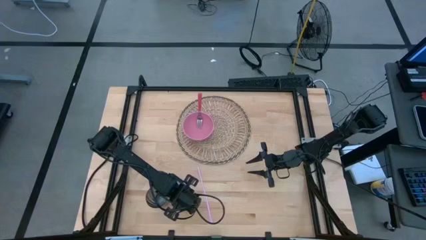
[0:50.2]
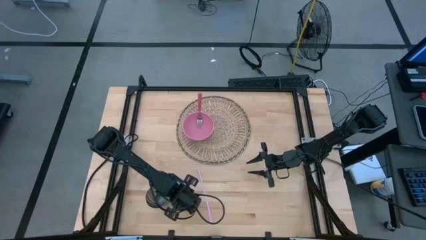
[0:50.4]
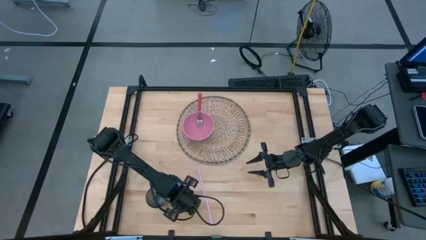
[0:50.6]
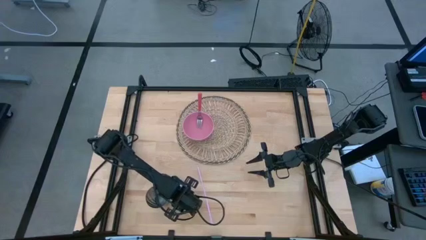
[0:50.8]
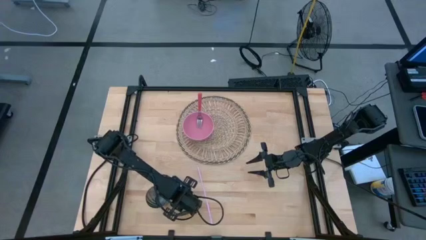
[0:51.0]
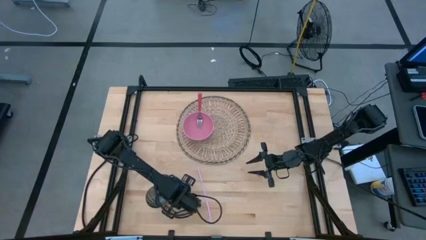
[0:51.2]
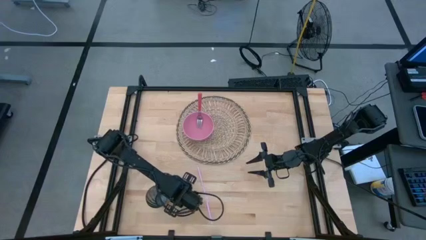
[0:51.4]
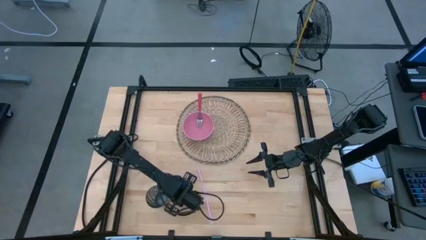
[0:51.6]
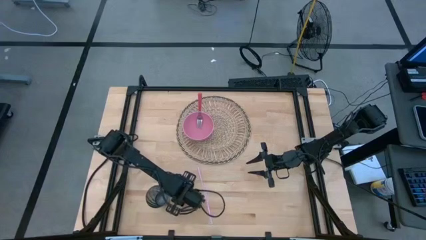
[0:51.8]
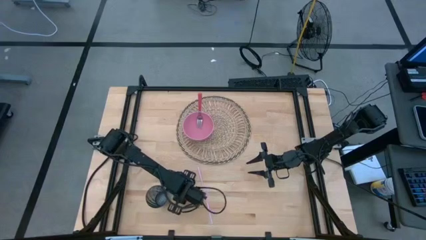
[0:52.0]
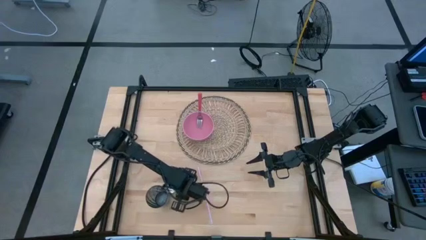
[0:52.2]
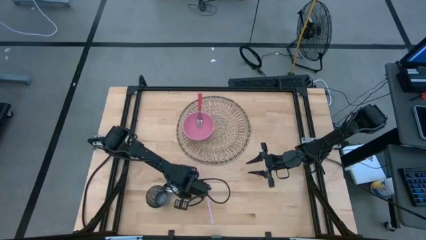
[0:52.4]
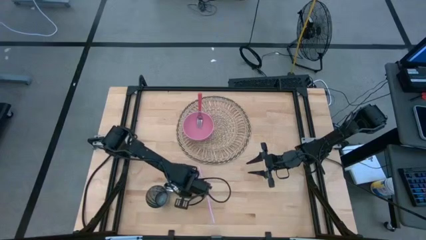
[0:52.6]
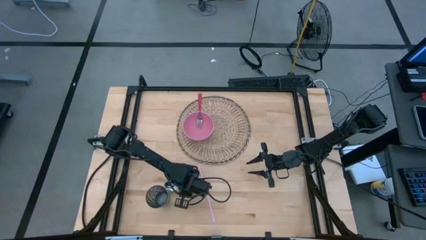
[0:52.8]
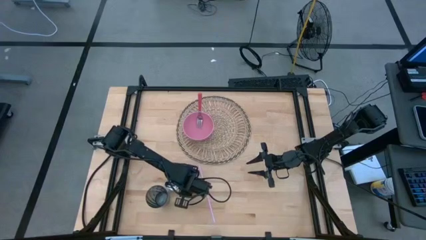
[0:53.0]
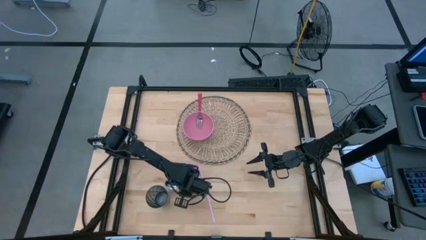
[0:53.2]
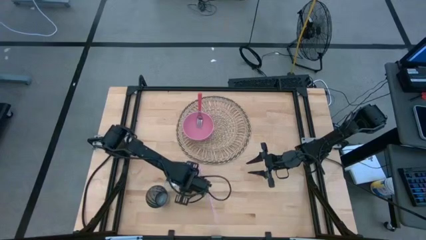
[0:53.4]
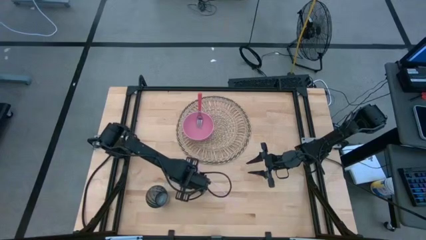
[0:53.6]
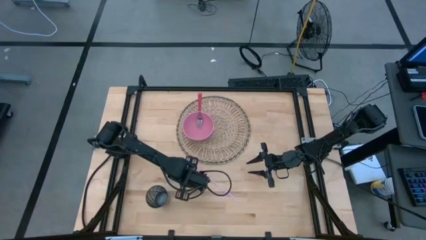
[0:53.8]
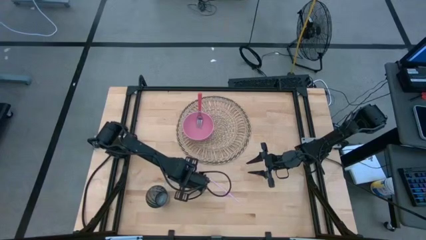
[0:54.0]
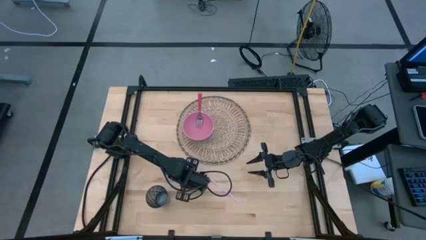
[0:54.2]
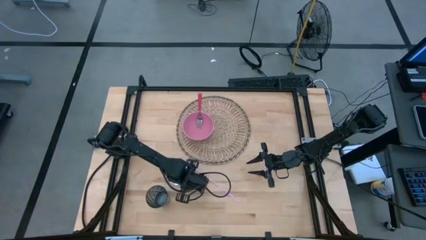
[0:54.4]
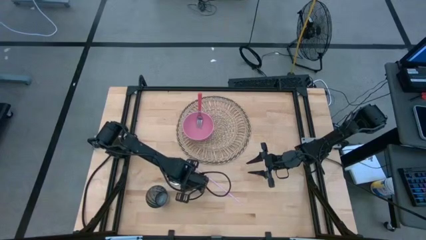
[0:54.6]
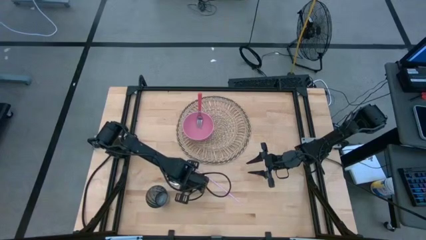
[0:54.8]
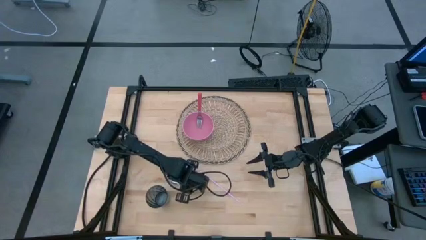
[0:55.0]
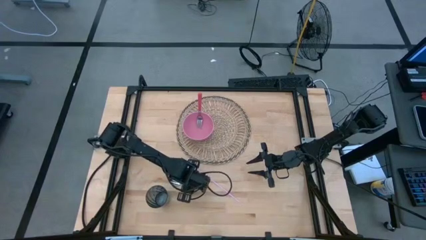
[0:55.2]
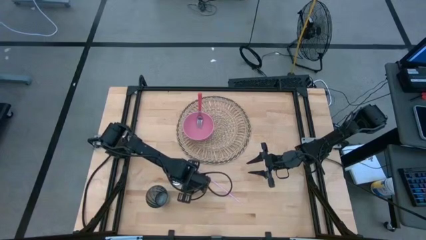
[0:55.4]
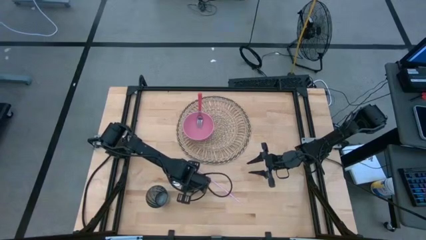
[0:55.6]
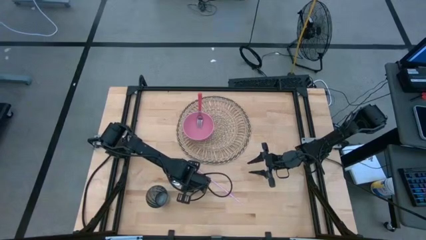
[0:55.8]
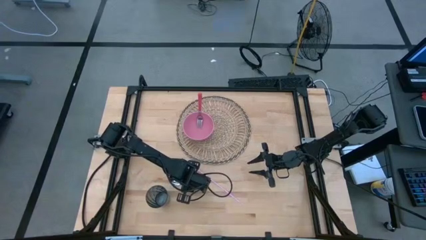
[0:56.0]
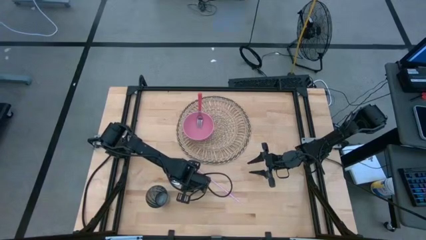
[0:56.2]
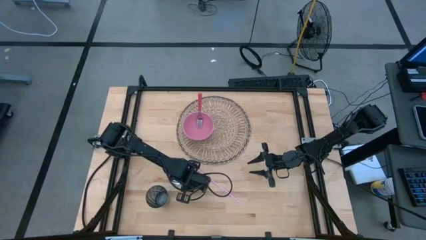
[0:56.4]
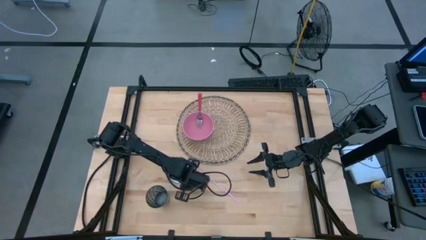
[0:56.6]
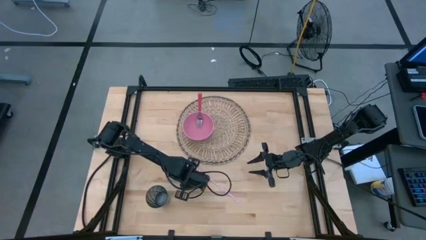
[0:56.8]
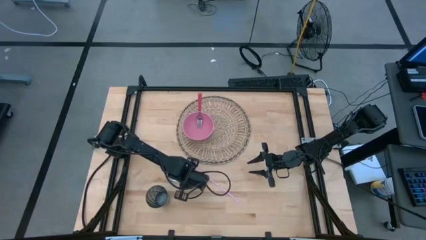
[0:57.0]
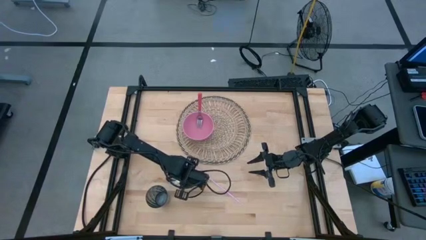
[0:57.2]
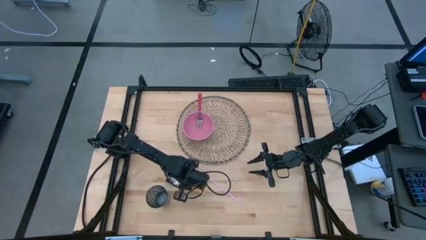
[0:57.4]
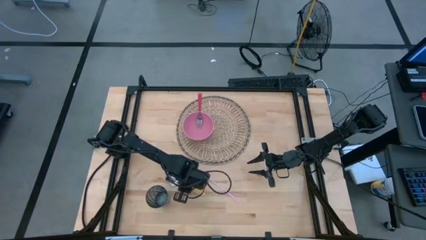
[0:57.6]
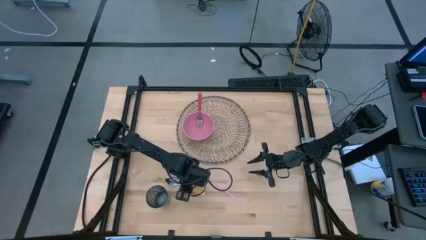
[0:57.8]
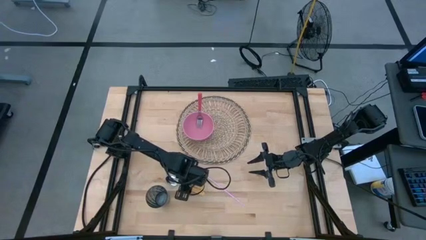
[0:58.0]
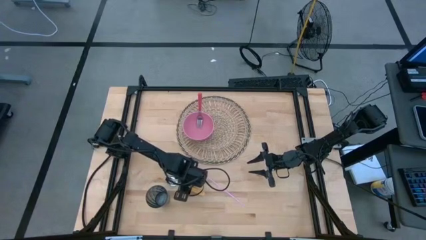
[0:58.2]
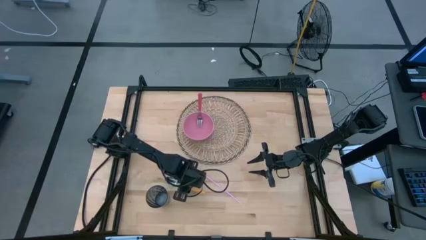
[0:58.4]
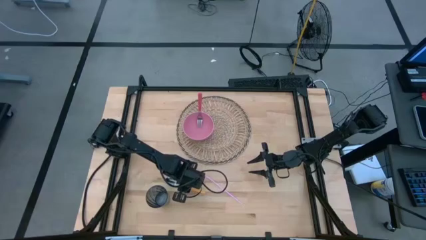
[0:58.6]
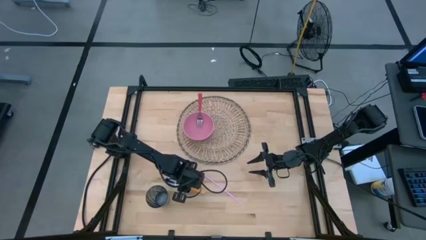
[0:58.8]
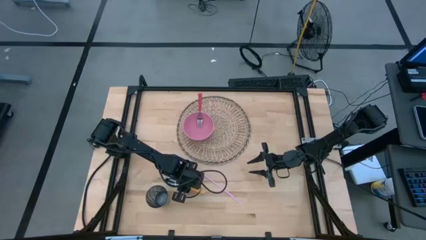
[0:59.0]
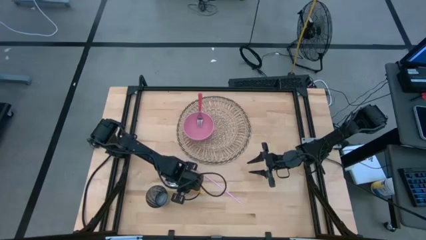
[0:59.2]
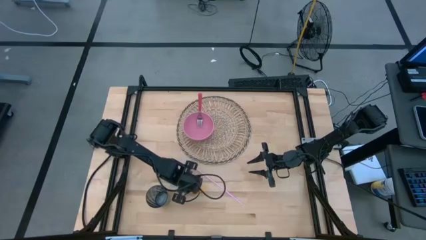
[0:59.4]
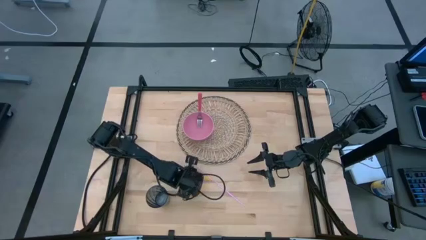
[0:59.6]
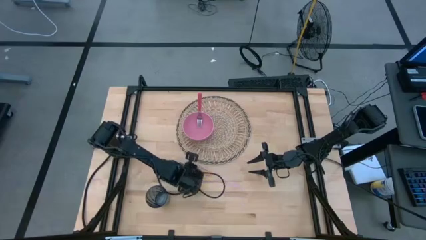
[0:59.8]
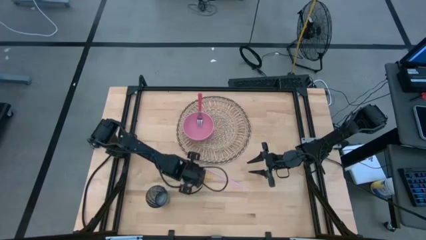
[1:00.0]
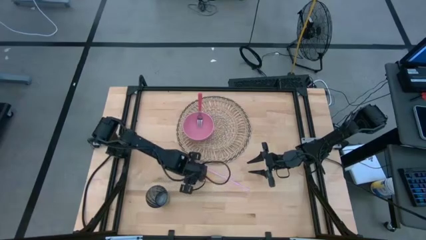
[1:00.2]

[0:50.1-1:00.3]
Task: Pick & Place Utensil
Put the yellow spoon on the bowl on the brown placemat

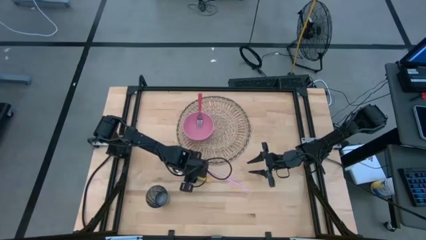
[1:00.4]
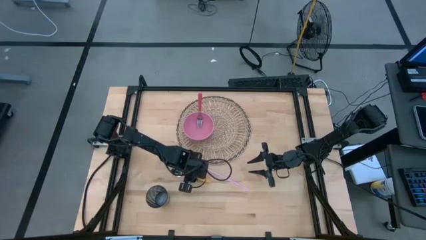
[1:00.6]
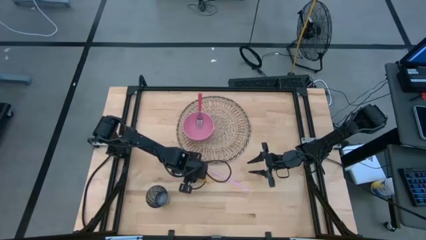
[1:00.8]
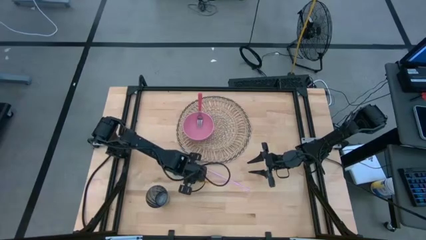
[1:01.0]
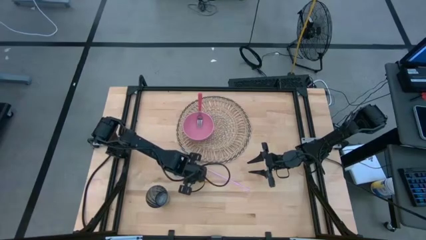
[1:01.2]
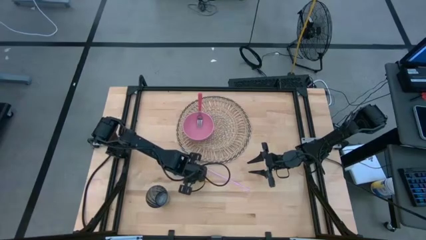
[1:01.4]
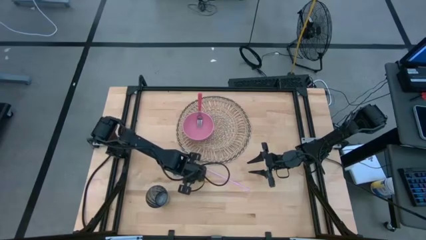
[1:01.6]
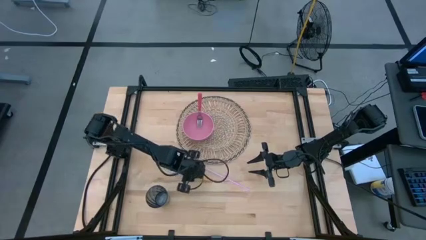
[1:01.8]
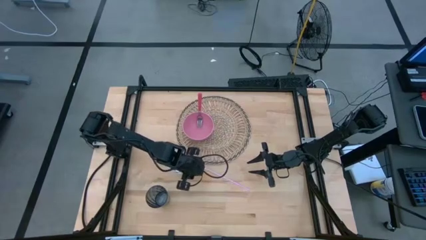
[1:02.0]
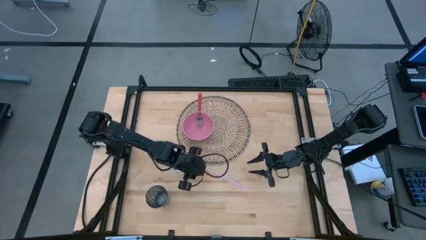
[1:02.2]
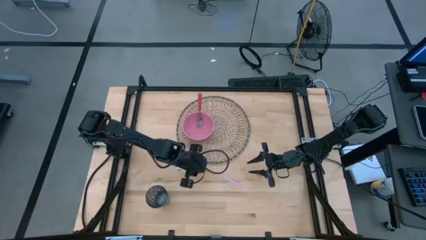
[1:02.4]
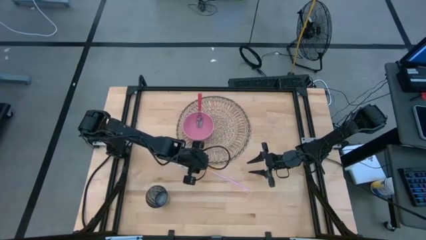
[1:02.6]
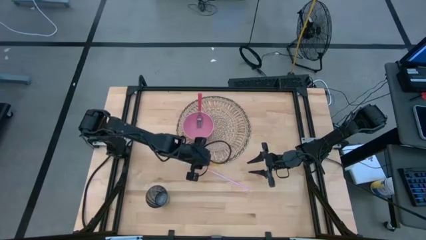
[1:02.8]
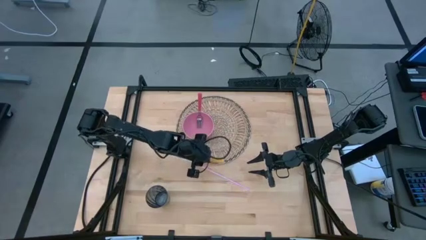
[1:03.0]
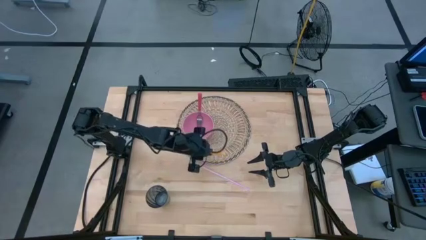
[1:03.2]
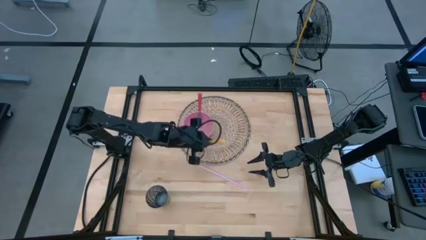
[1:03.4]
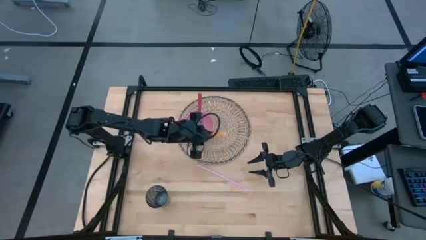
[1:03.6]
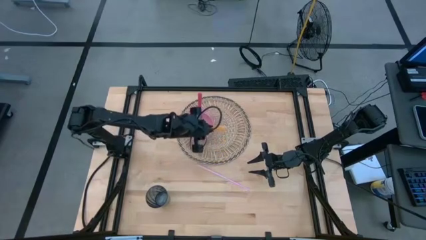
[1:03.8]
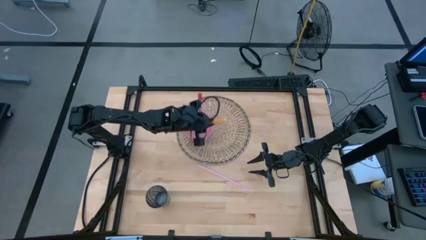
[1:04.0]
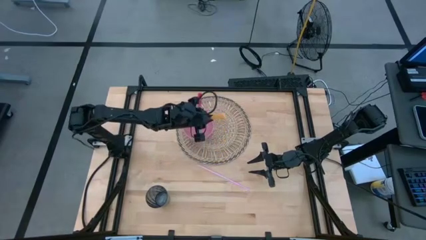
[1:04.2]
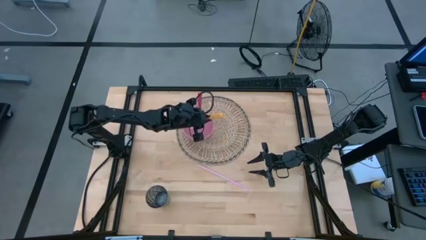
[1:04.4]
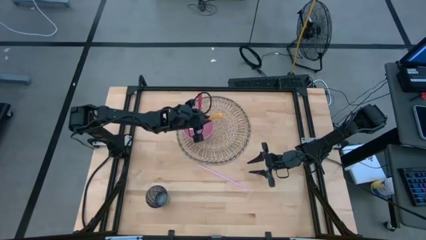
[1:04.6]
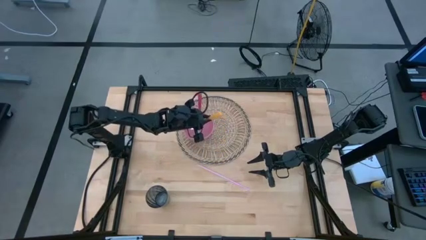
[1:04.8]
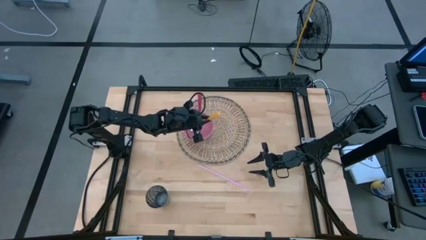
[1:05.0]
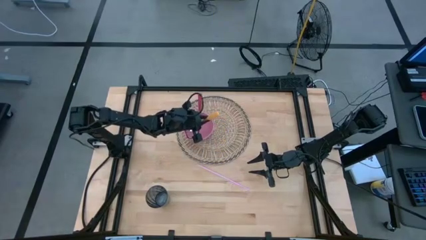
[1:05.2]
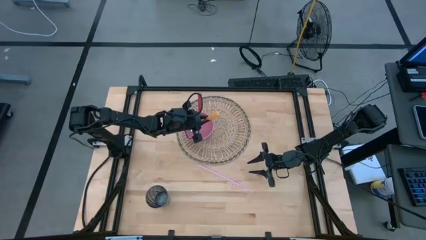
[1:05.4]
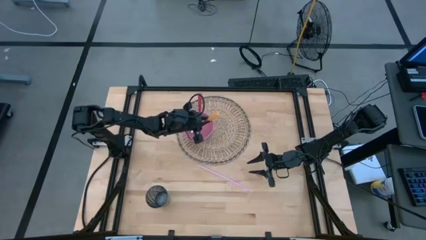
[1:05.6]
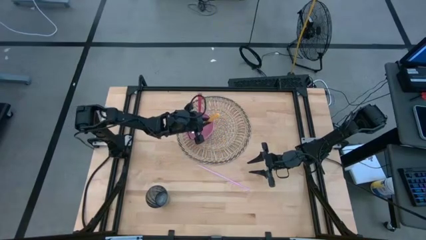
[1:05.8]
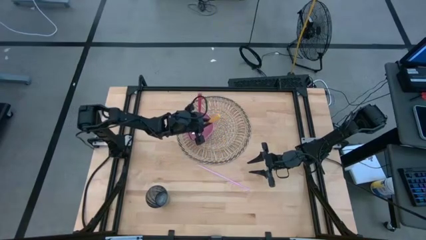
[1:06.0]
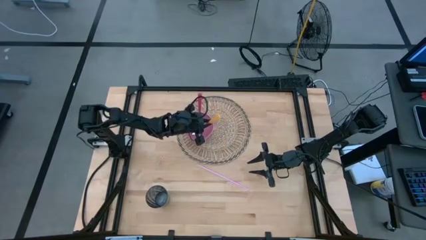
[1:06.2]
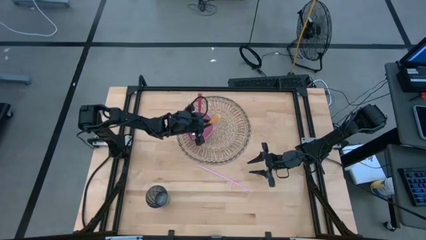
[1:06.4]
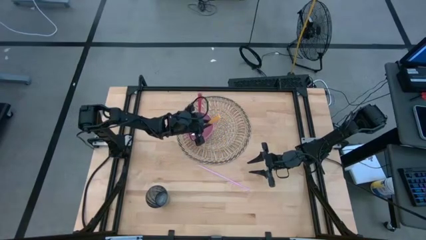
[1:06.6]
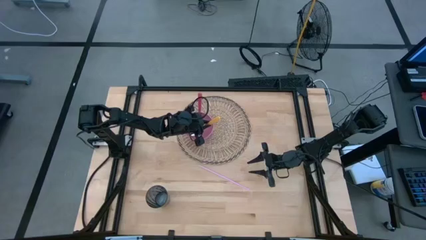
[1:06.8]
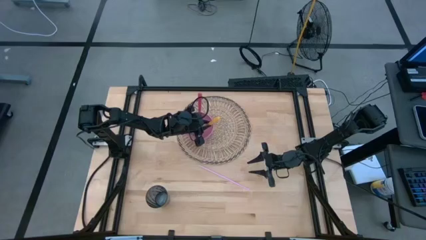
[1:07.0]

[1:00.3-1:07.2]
Put the yellow spoon on the bowl on the brown placemat
